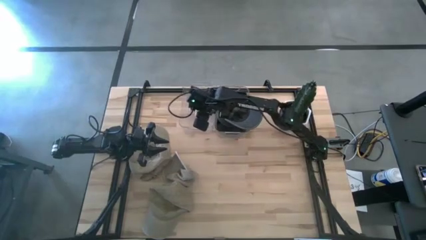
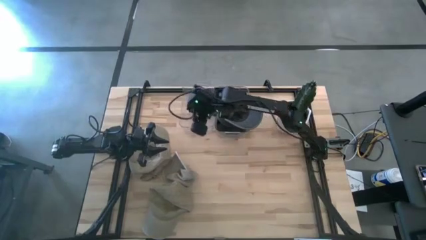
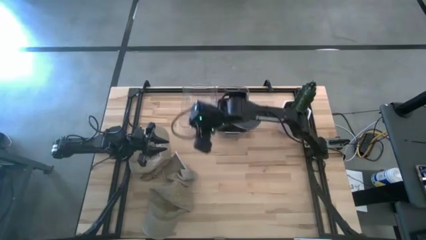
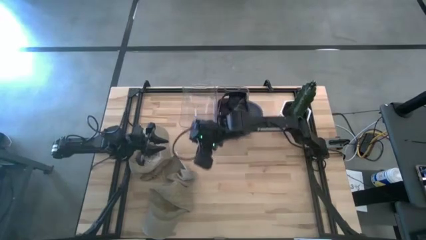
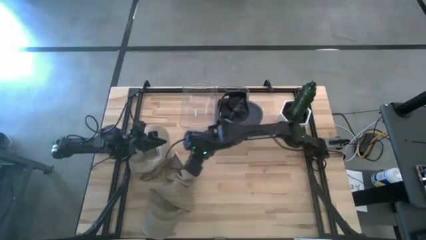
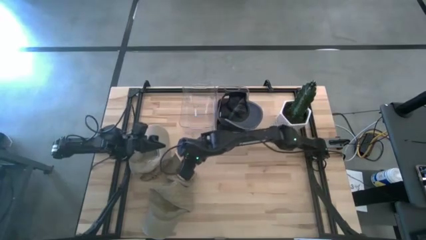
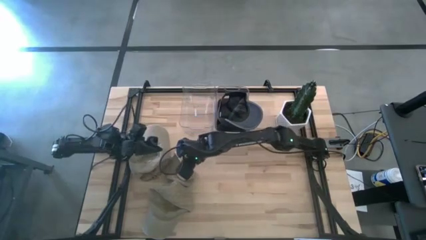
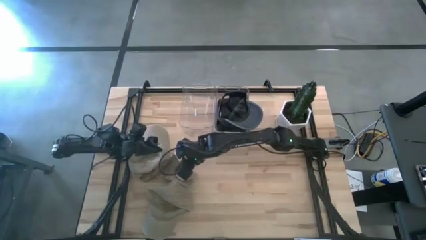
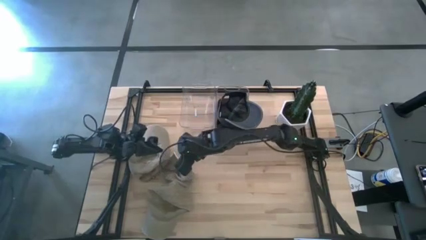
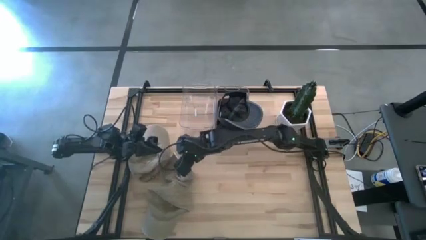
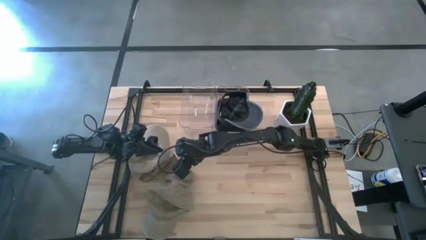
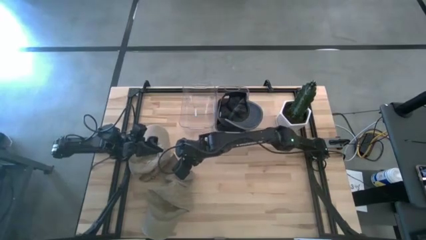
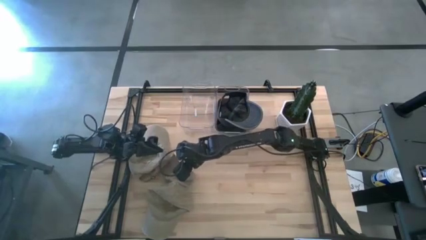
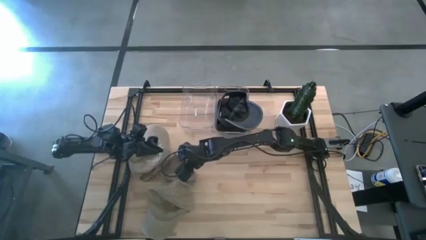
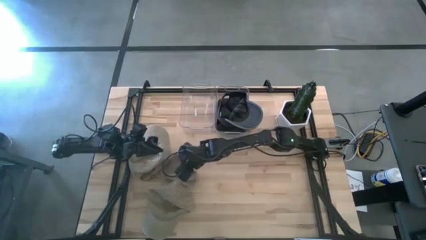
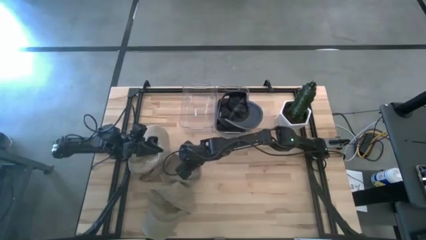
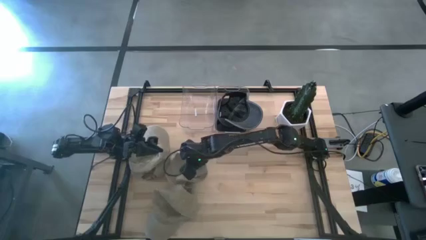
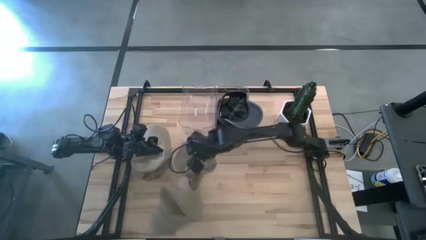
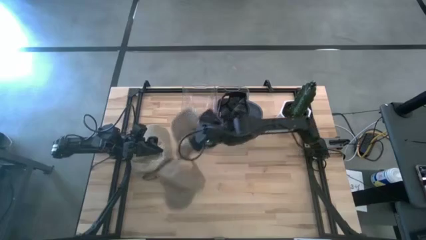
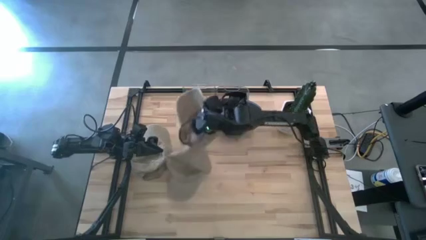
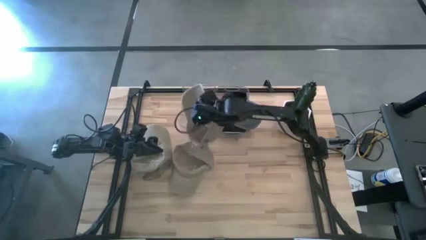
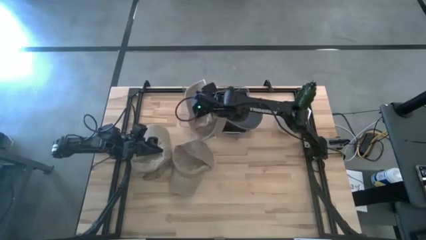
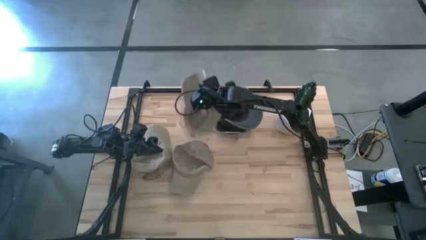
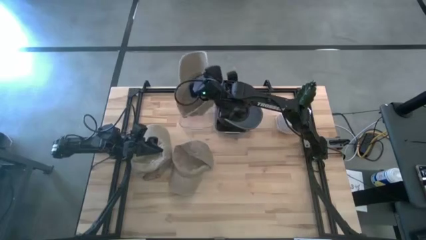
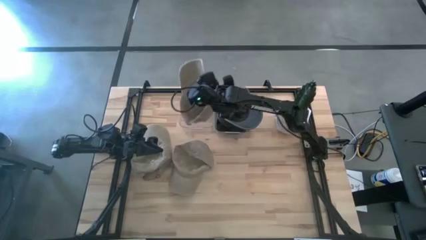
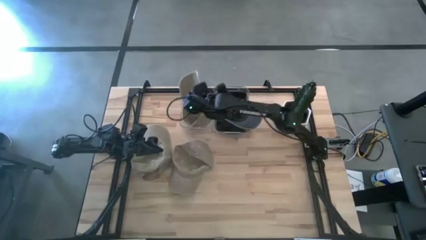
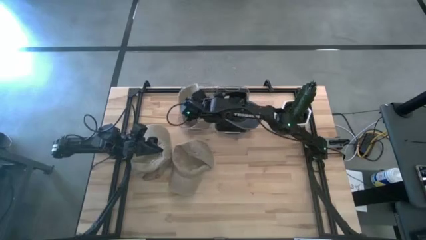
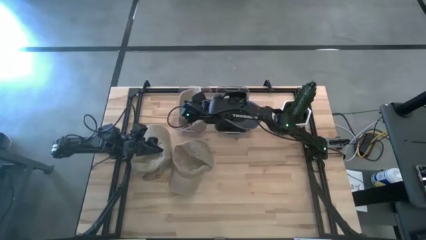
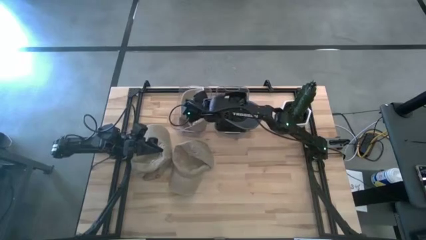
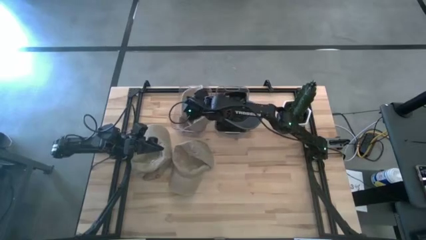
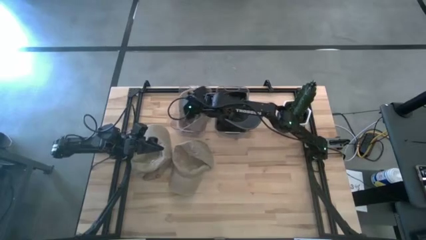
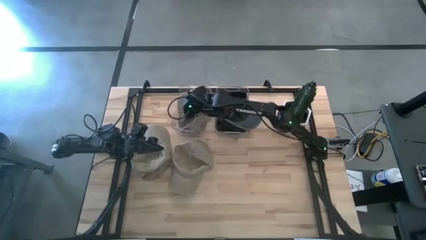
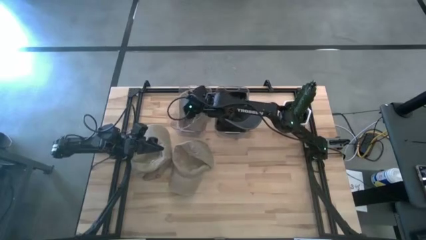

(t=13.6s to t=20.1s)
Task: Pick & Place hat
Put the middle brown cap into the left transparent bin

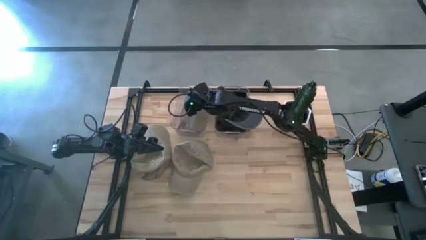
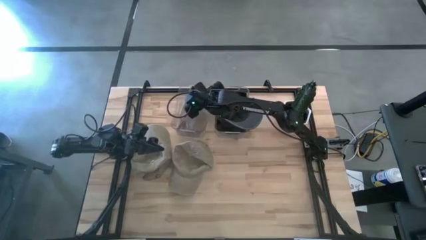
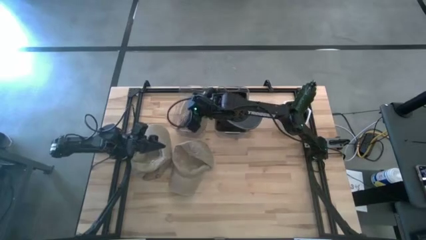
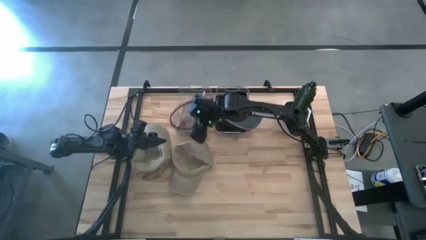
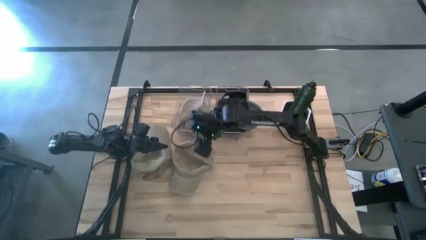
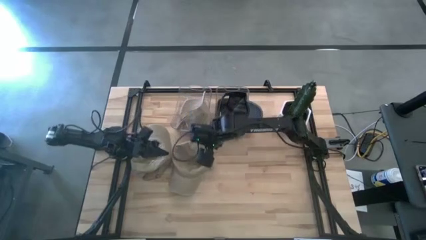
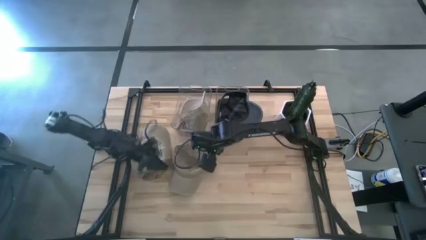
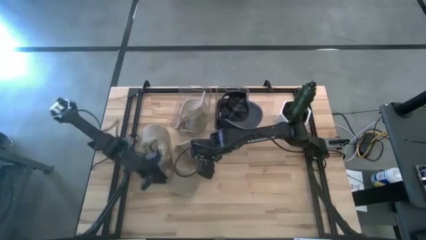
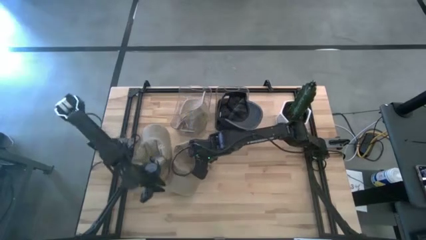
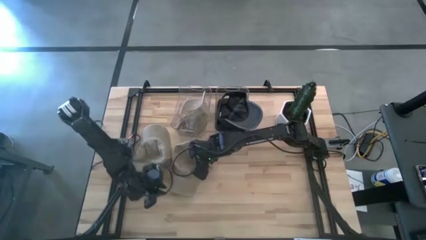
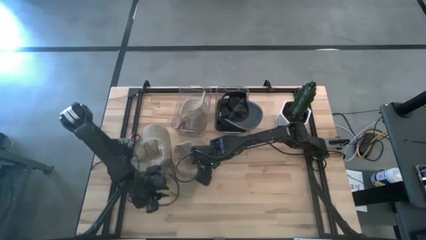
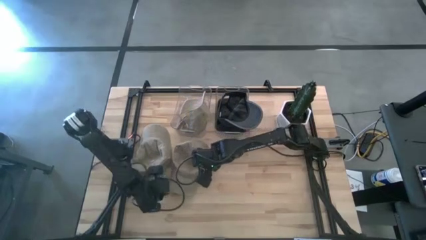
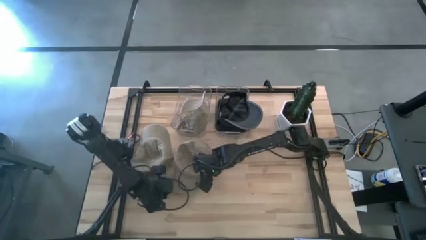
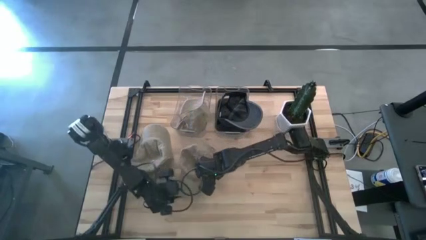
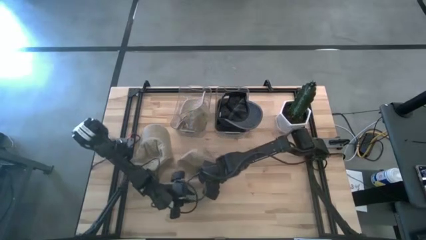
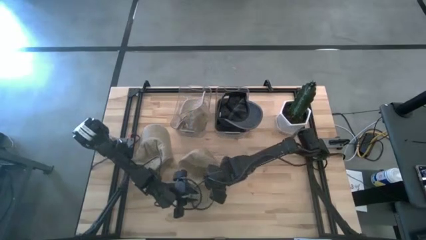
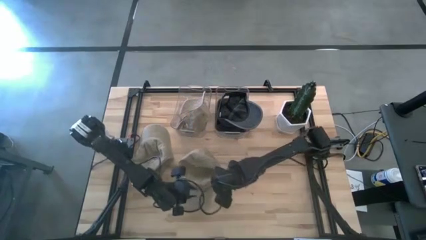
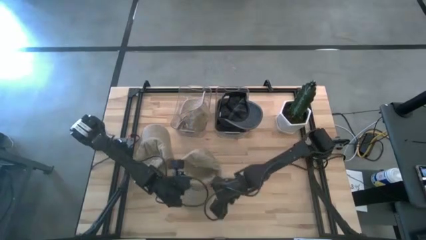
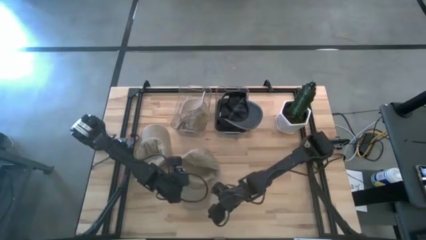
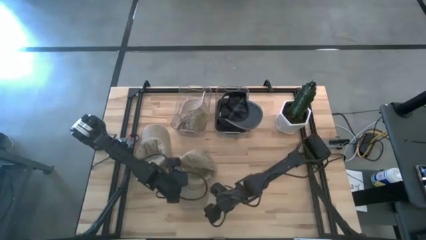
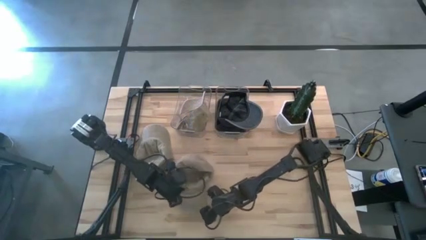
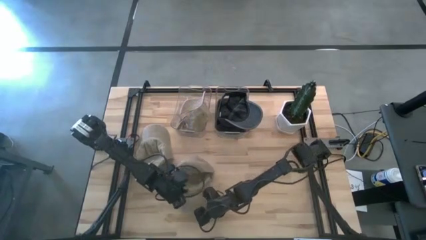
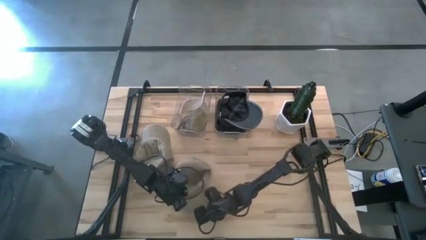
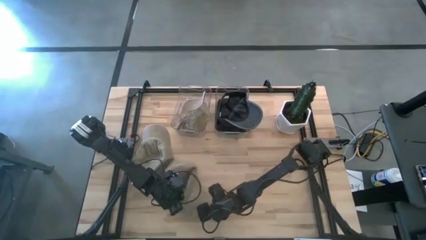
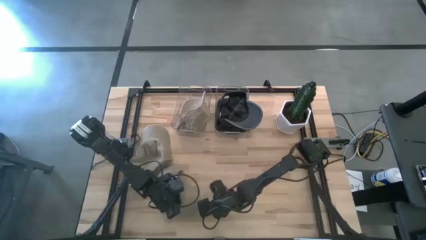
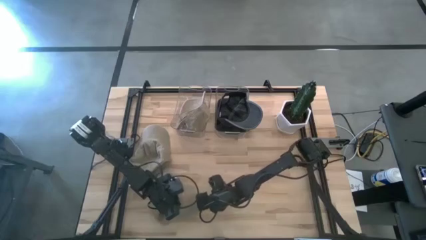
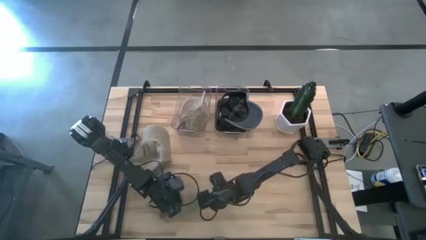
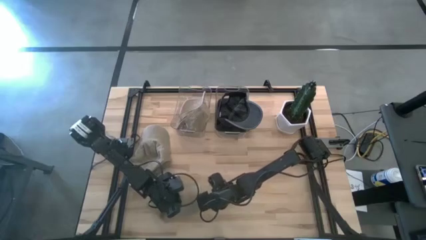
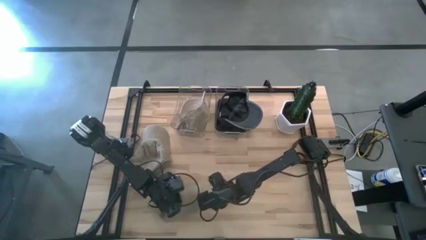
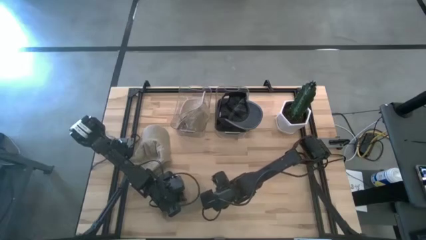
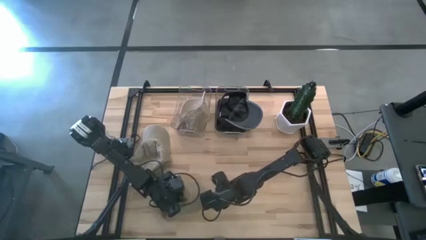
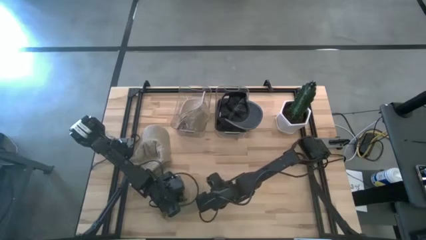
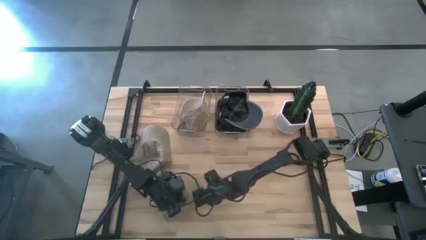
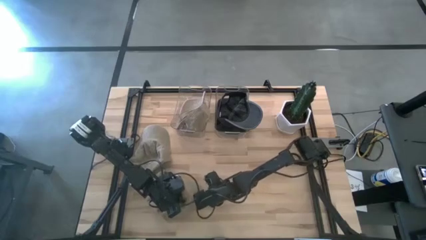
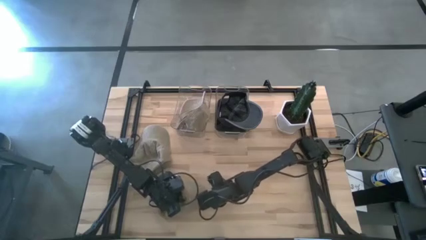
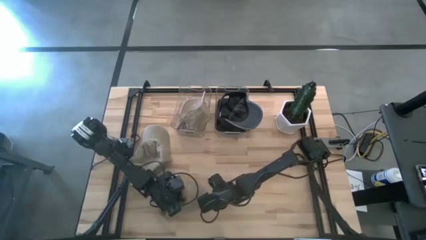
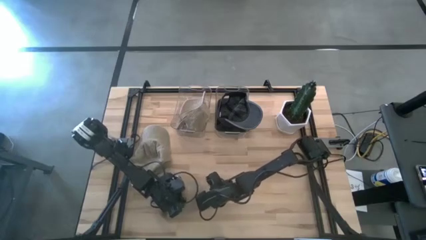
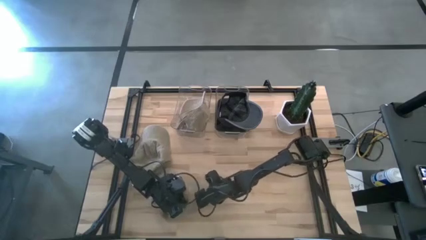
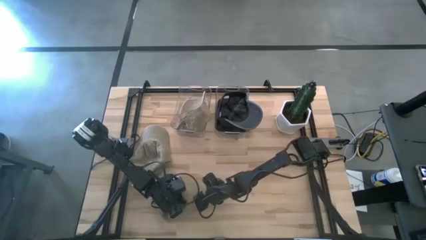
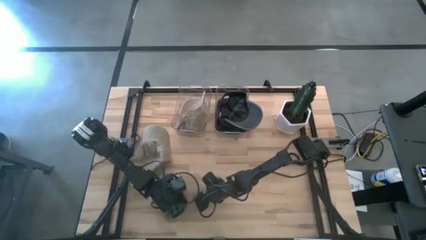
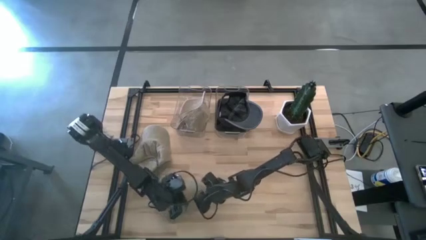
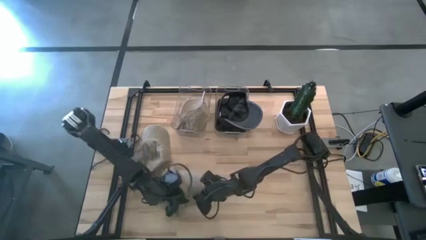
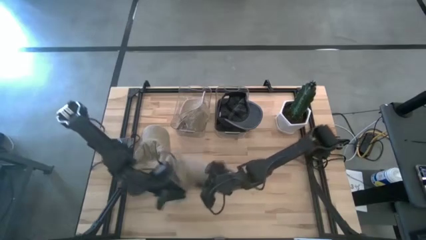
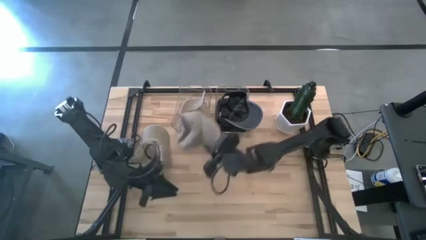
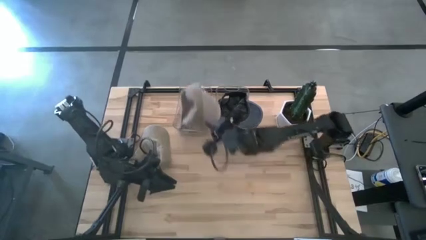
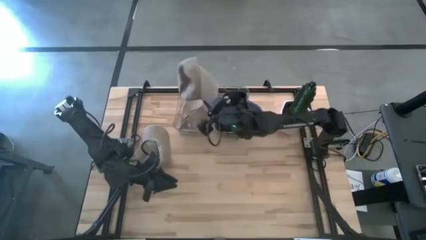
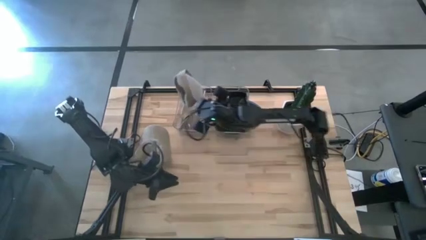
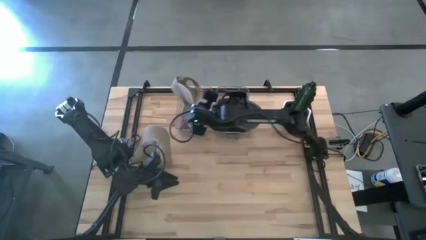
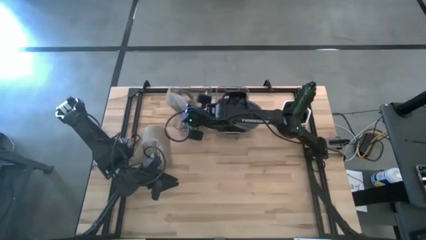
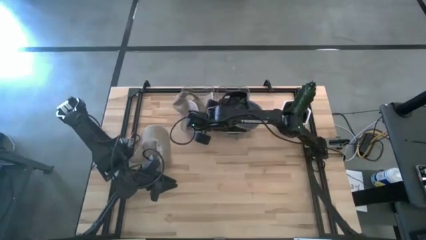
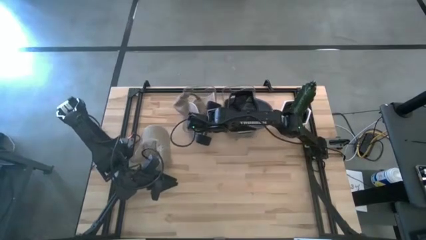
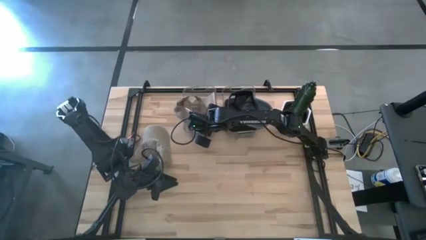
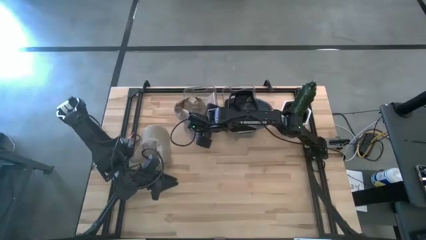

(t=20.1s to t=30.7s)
Put the right brown cap into the left transparent bin
